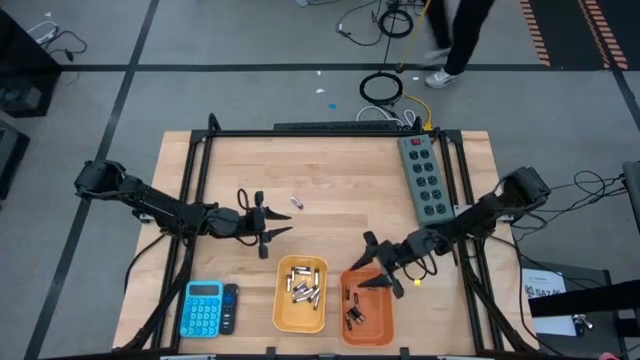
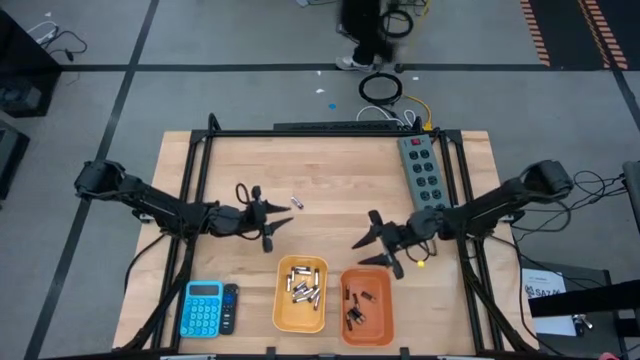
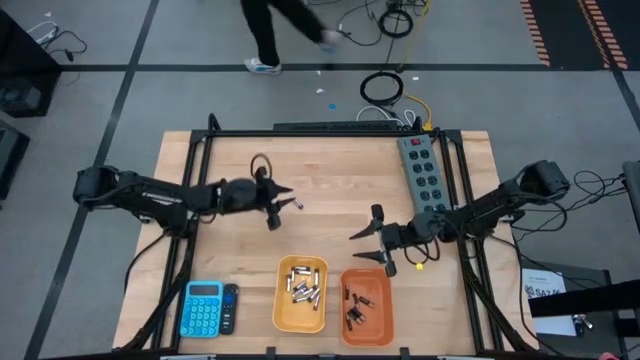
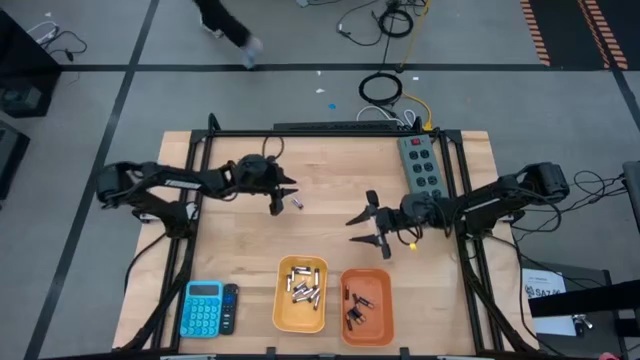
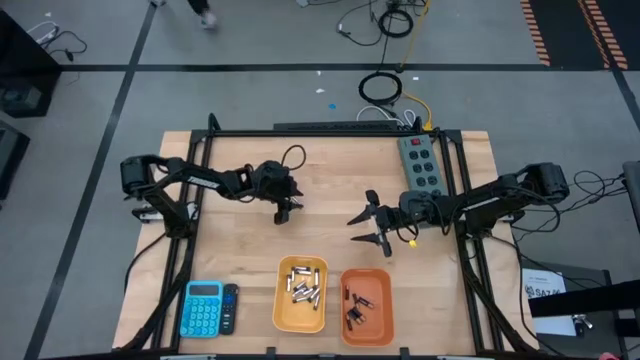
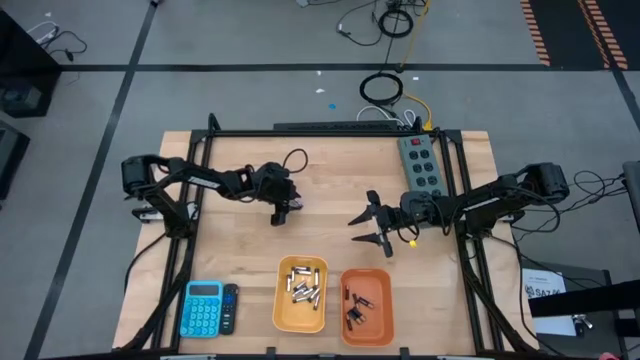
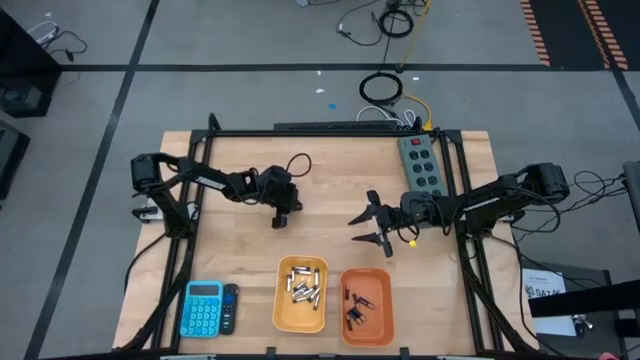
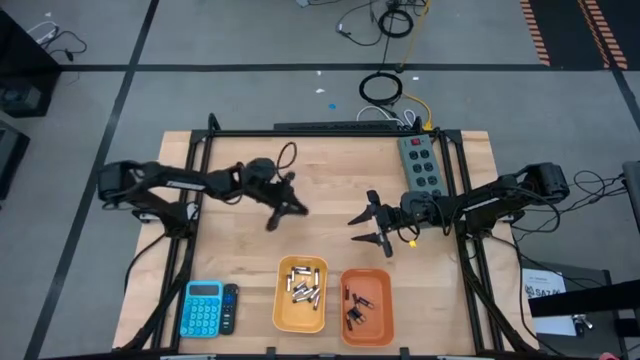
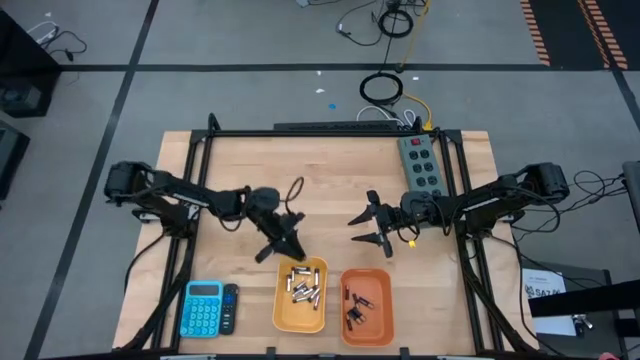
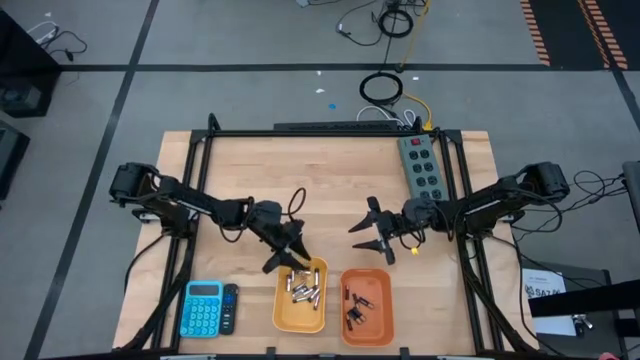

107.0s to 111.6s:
Task: Sort batteries
Put the silver battery into the yellow bin

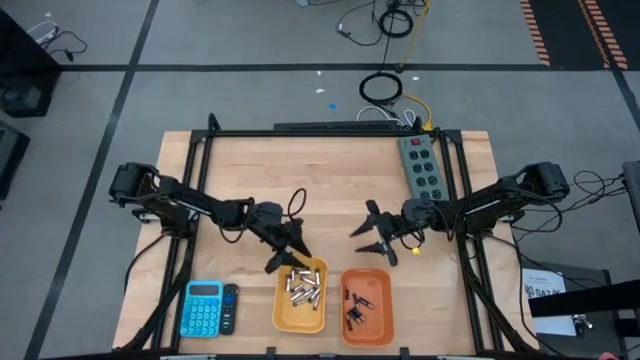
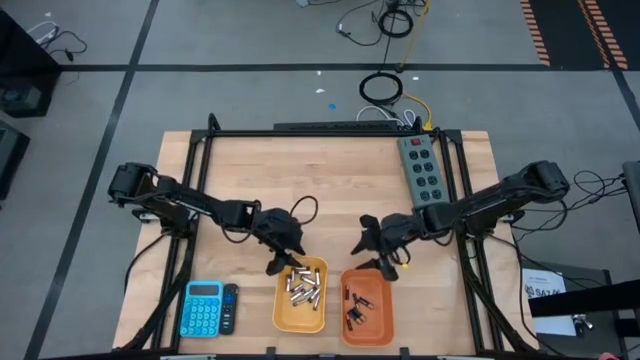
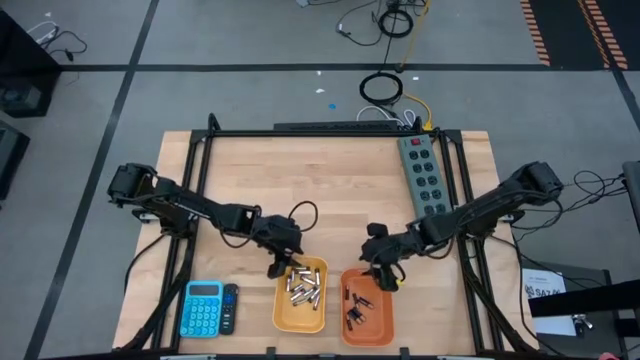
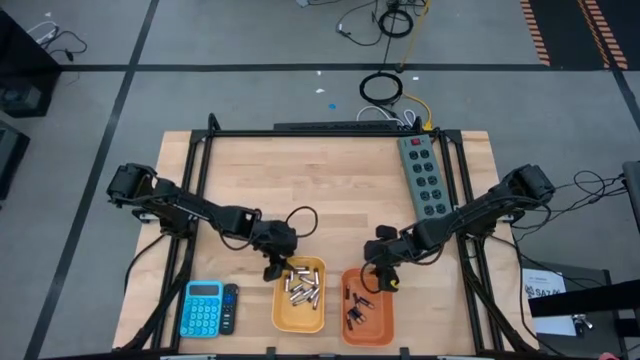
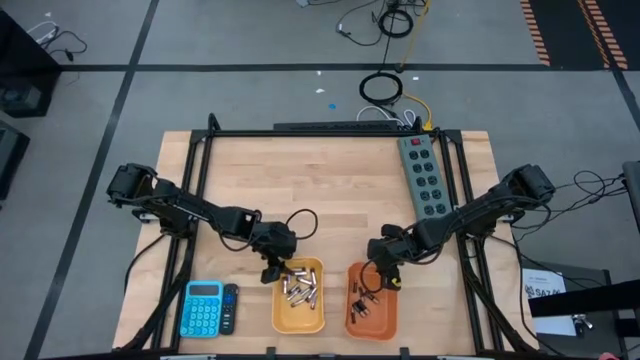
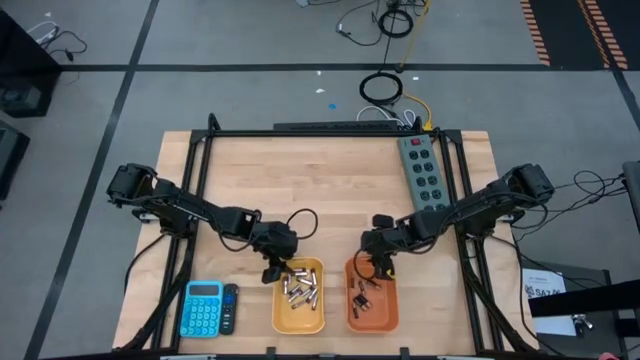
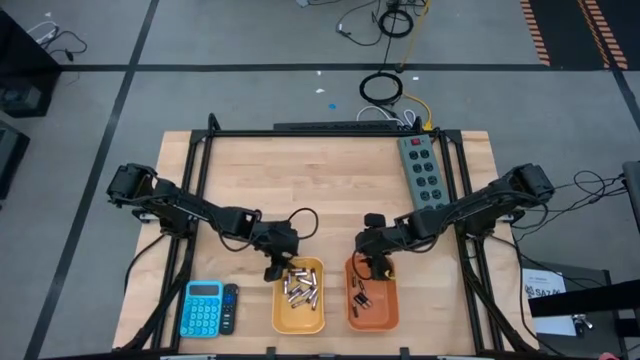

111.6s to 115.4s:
Adjust the bins on the table

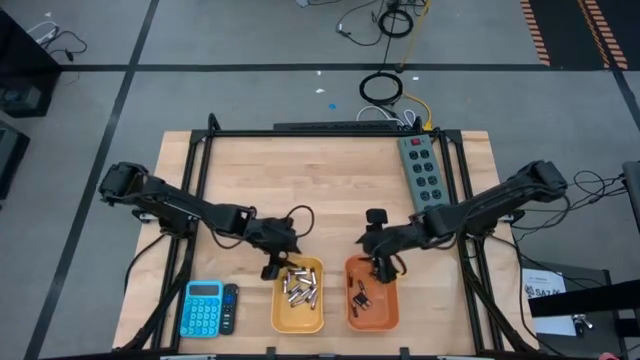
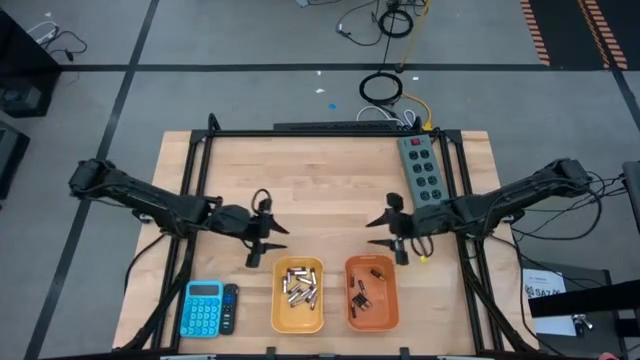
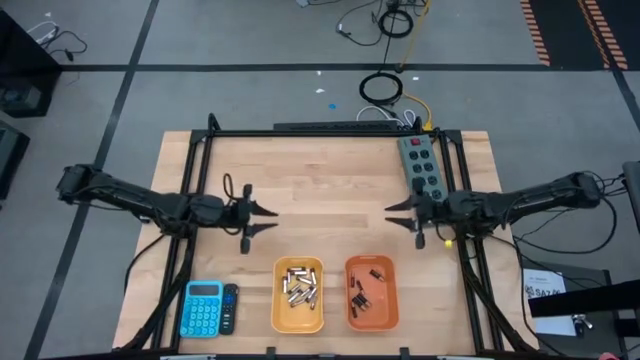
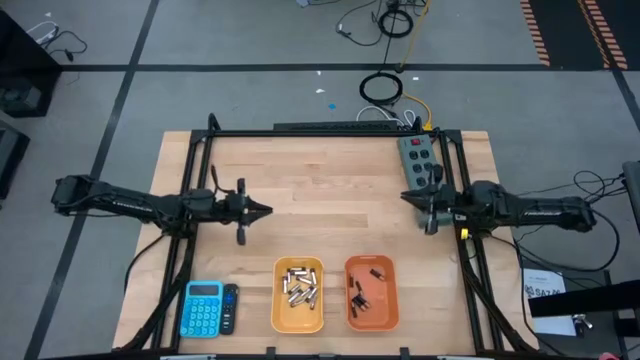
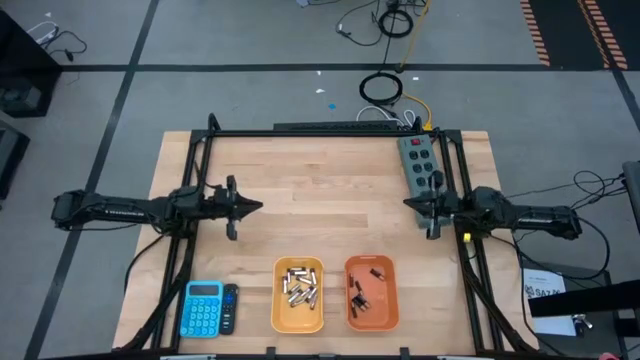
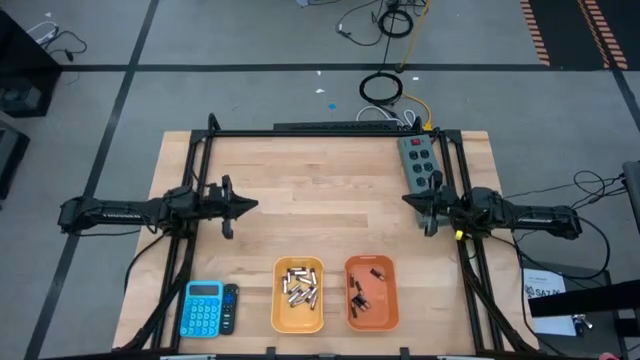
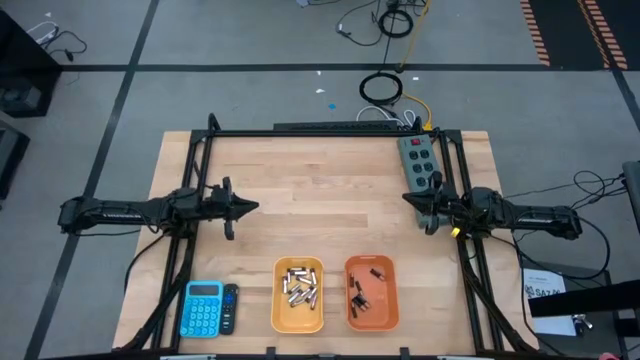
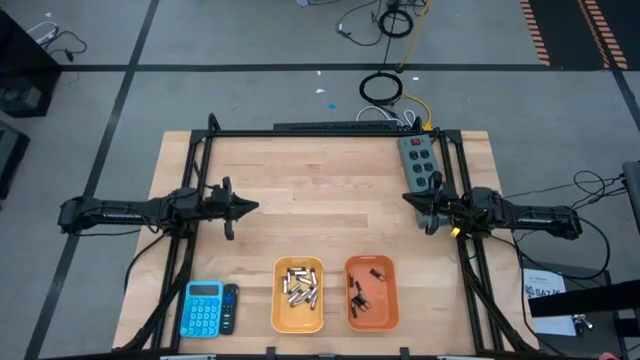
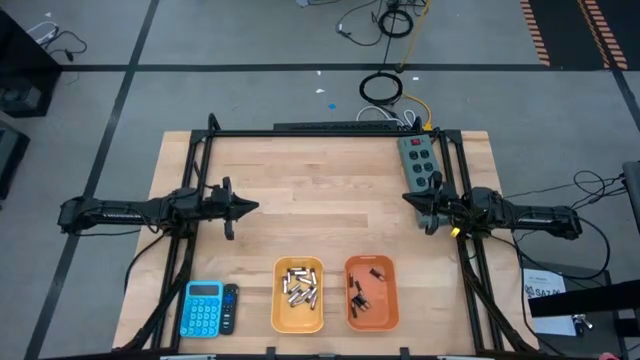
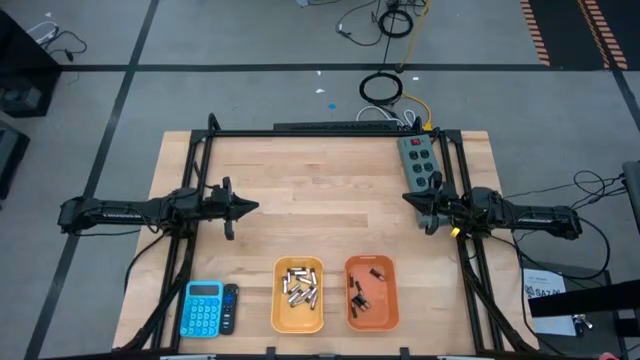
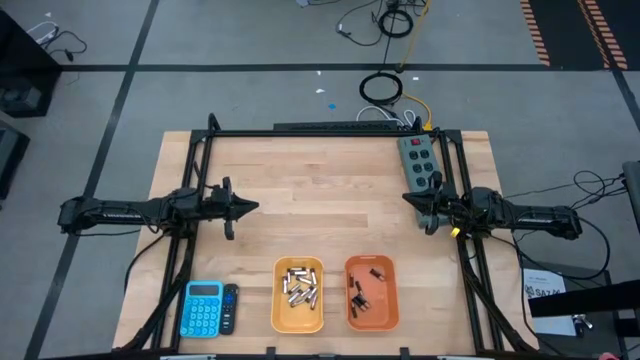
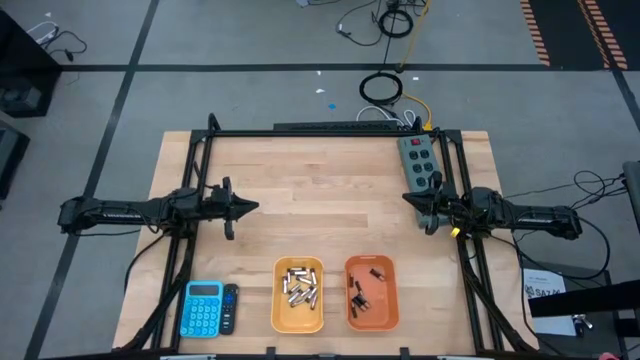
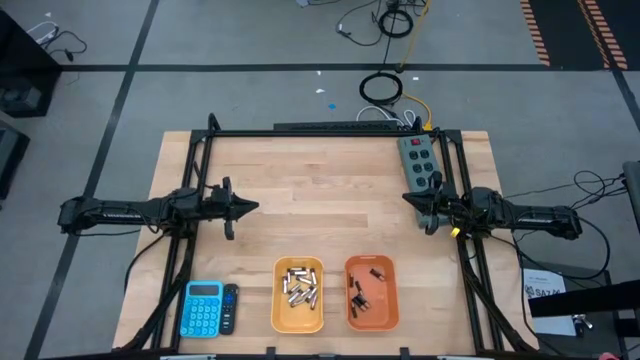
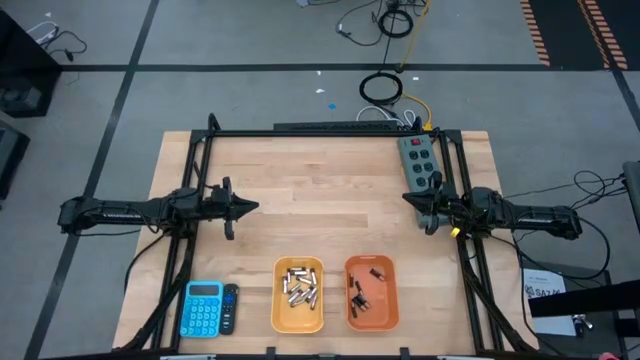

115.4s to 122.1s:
Return to Home Position

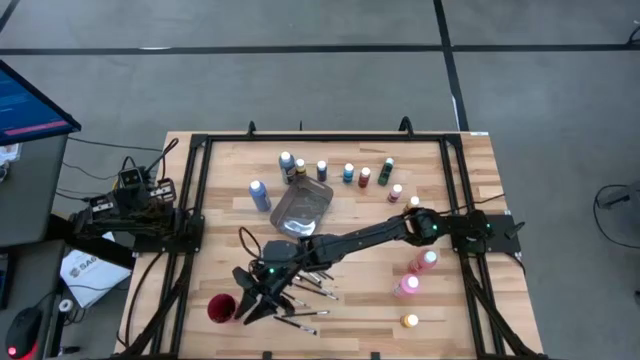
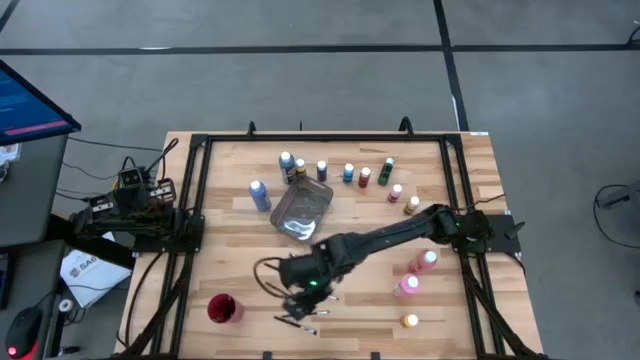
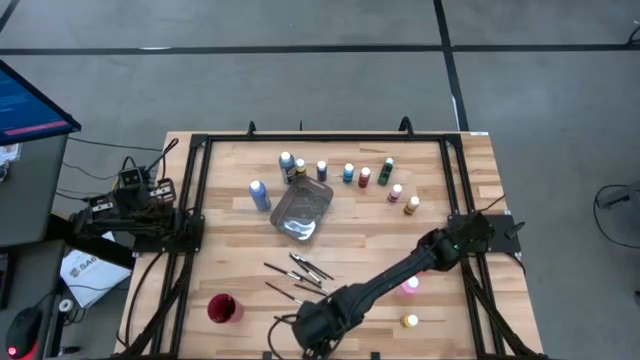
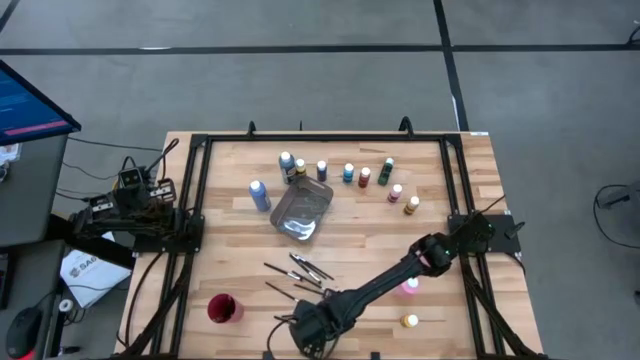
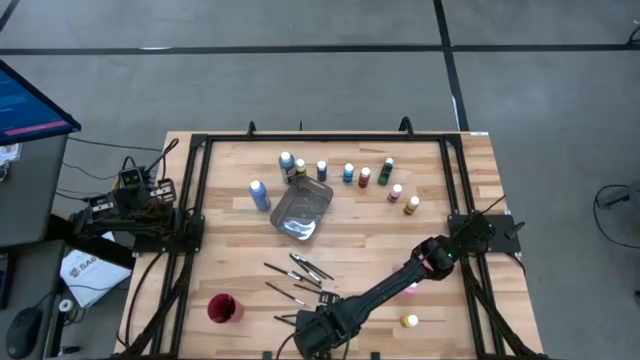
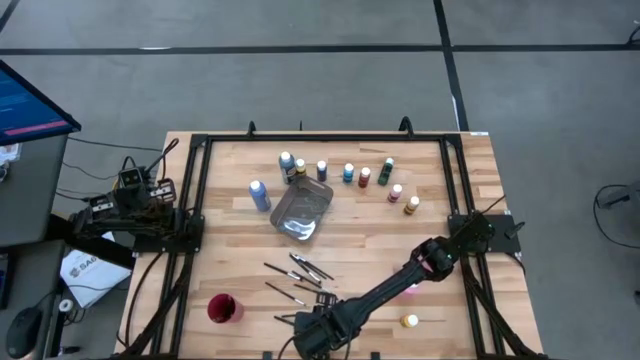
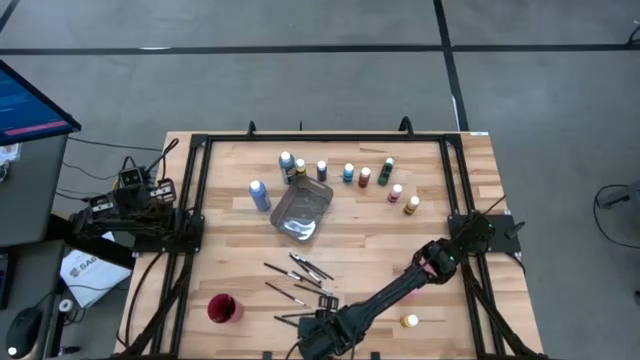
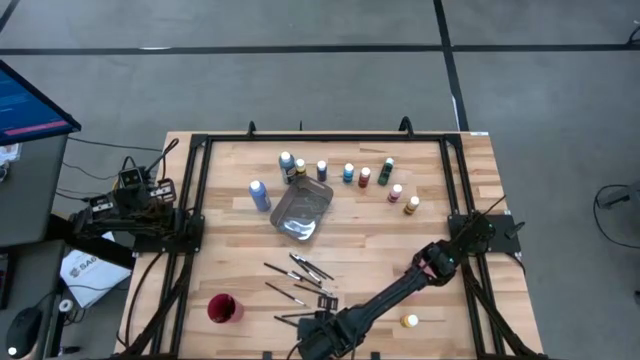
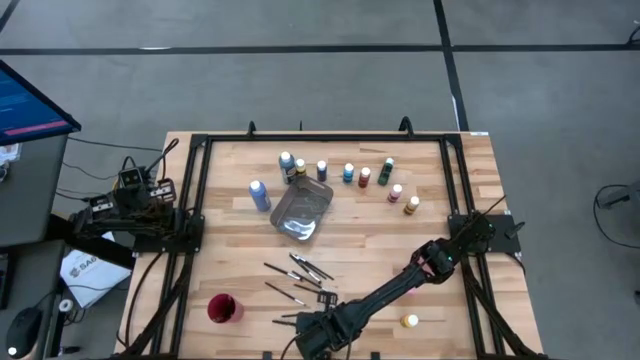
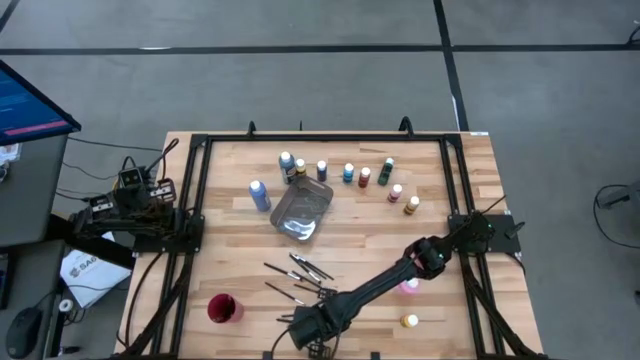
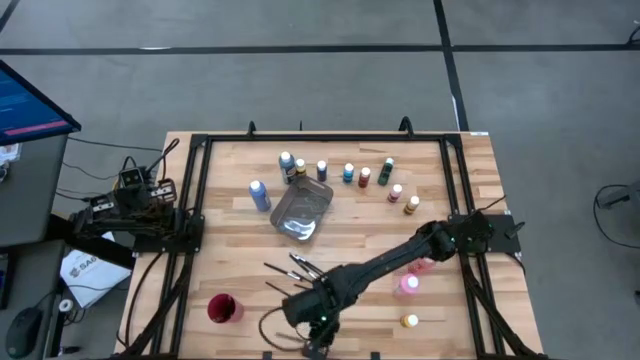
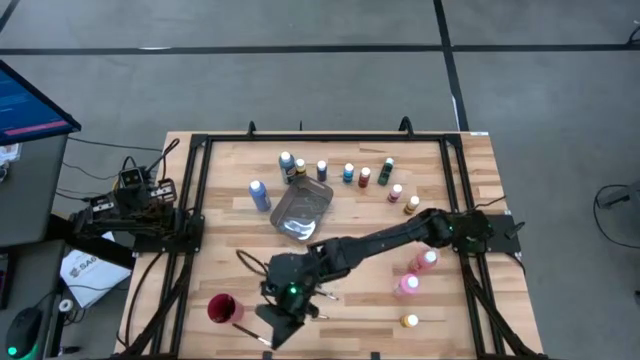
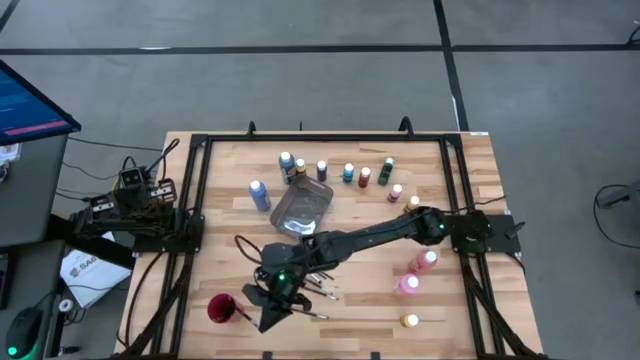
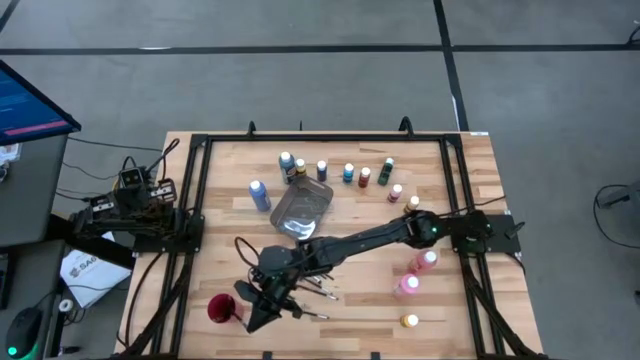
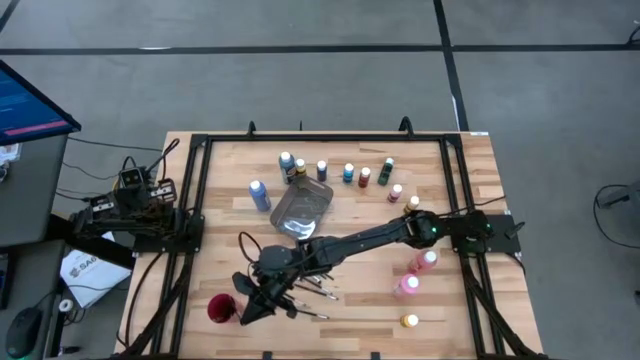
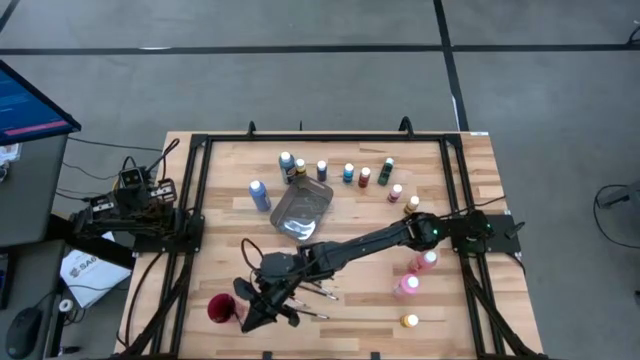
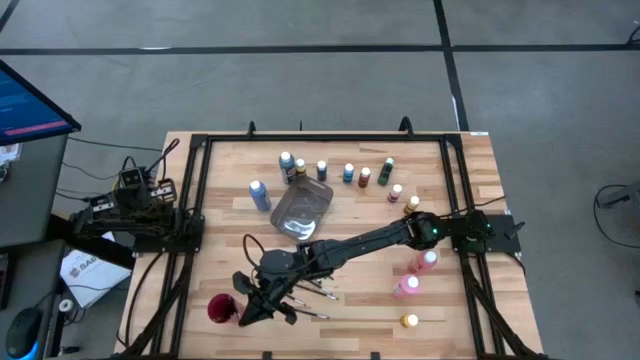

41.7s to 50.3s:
Task: Pick & Place Paint Supplies
Put the silver paintbrush into the red cup
